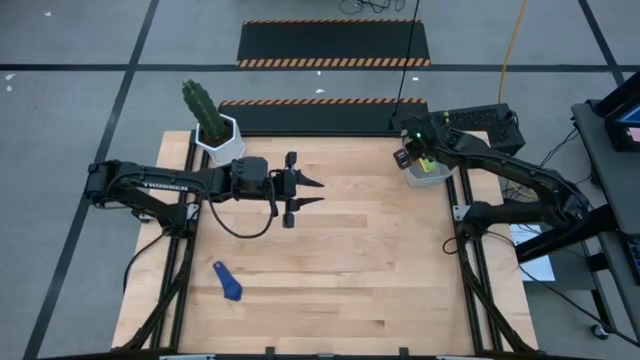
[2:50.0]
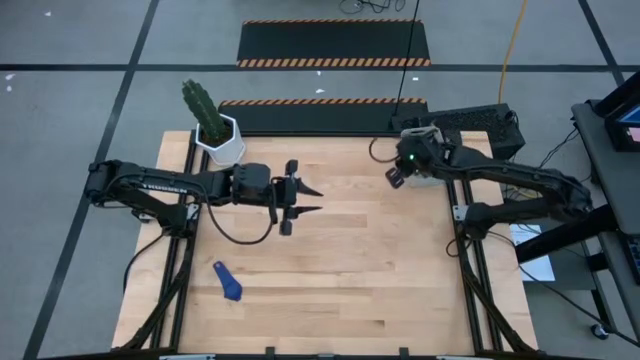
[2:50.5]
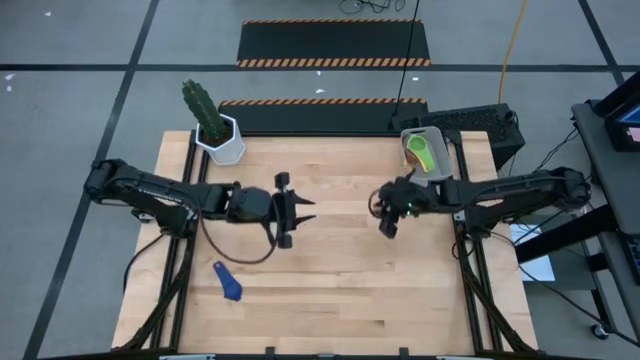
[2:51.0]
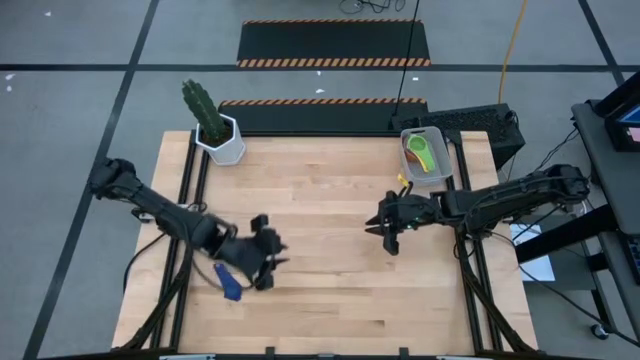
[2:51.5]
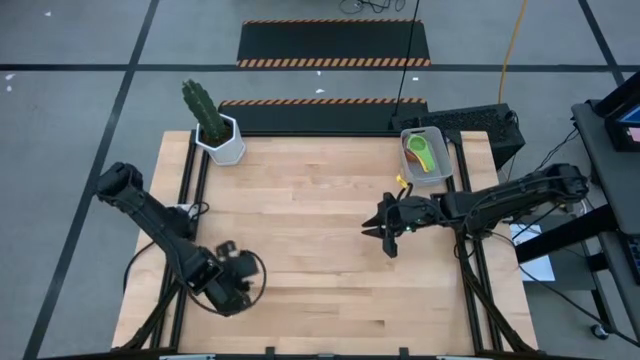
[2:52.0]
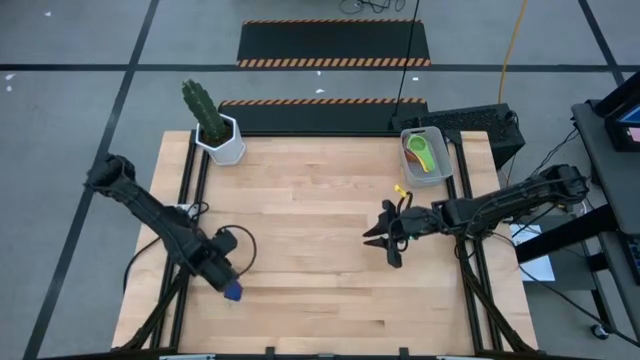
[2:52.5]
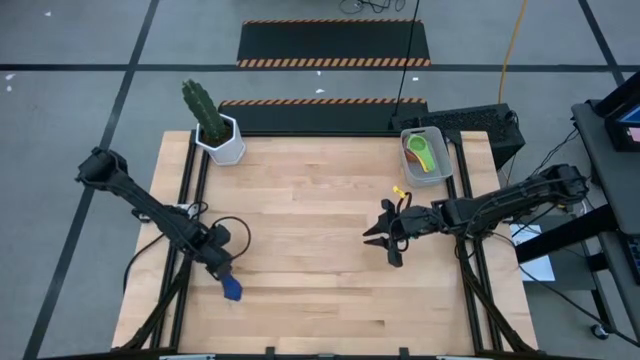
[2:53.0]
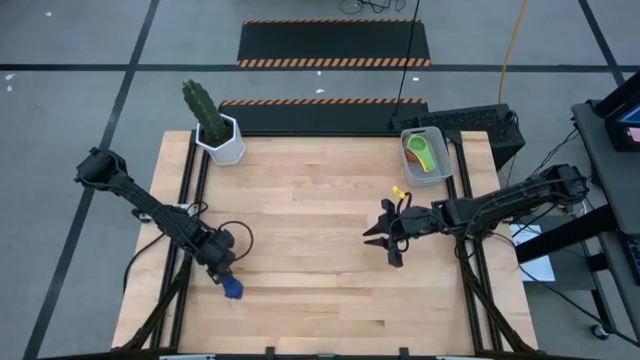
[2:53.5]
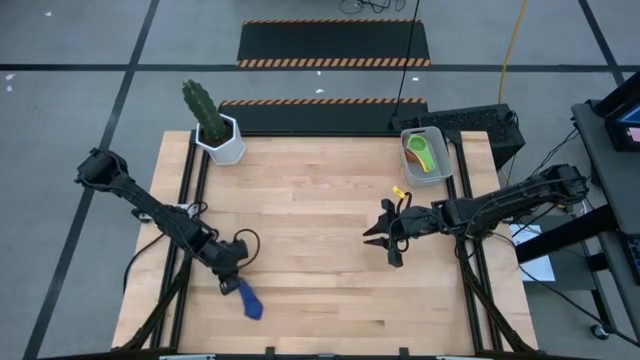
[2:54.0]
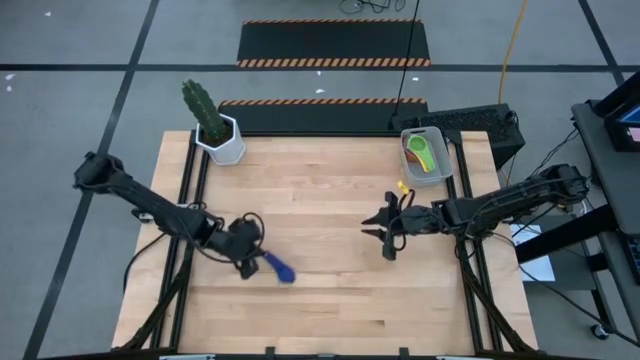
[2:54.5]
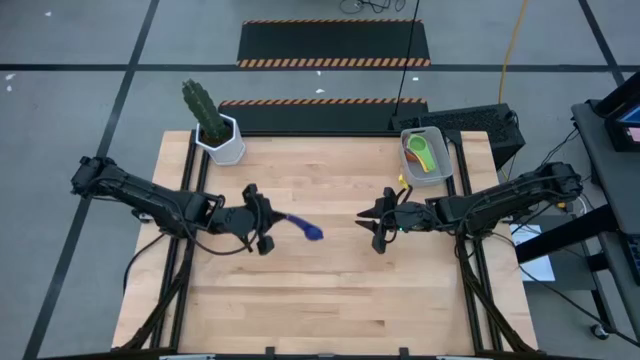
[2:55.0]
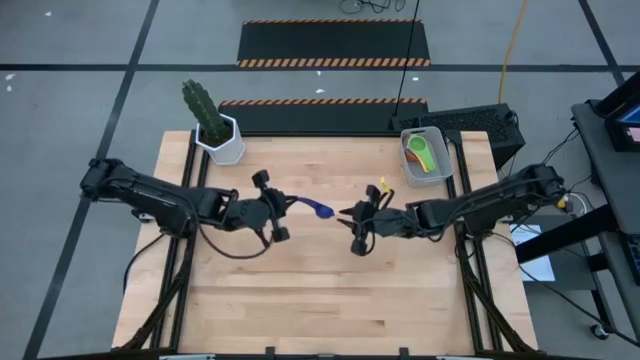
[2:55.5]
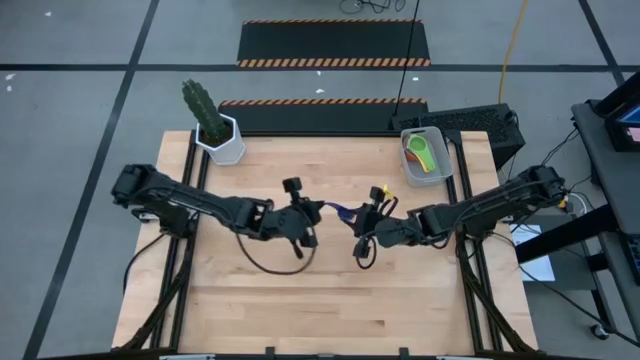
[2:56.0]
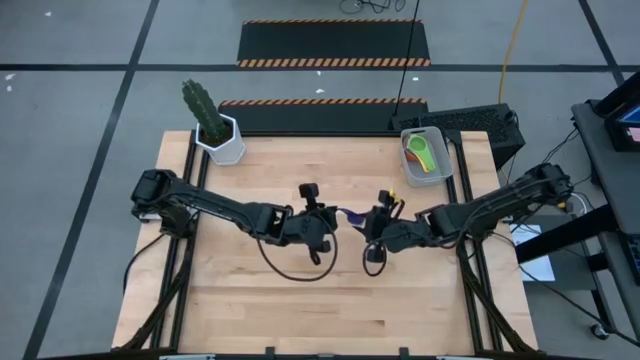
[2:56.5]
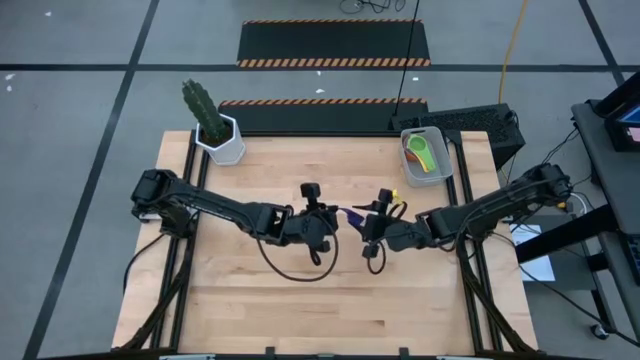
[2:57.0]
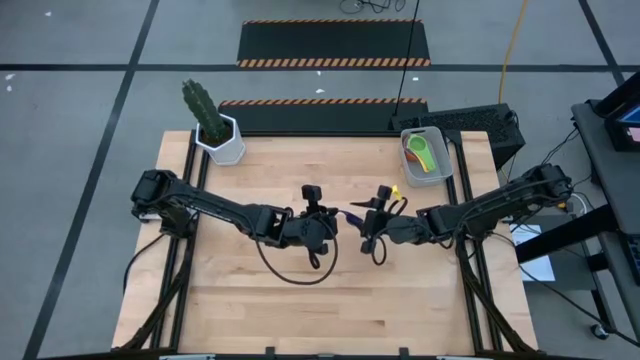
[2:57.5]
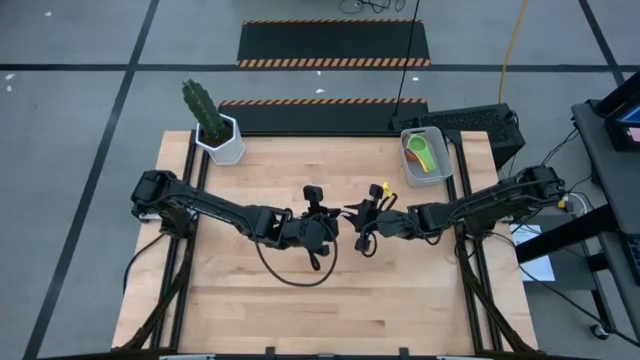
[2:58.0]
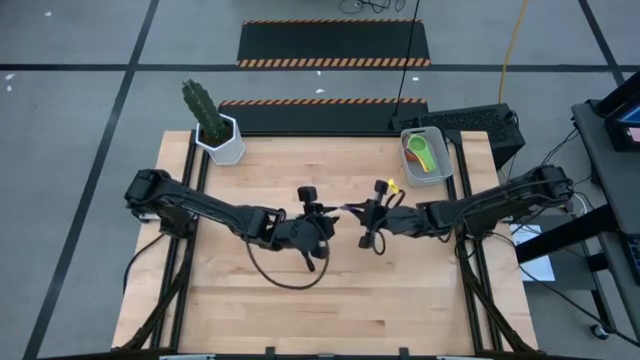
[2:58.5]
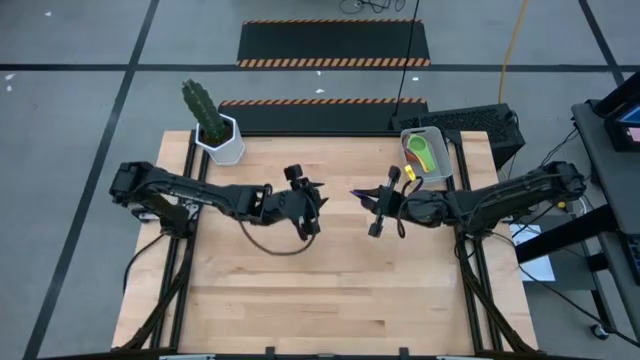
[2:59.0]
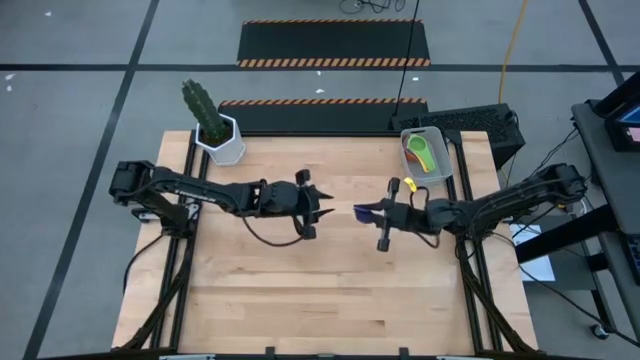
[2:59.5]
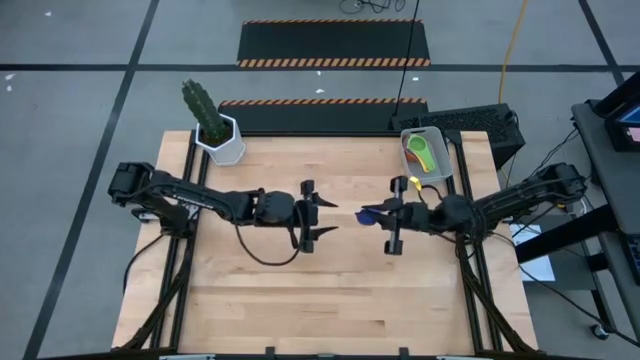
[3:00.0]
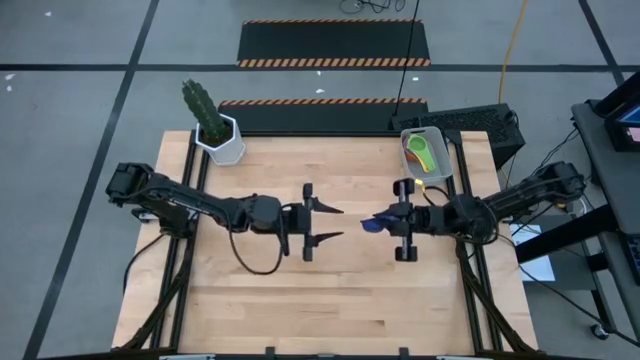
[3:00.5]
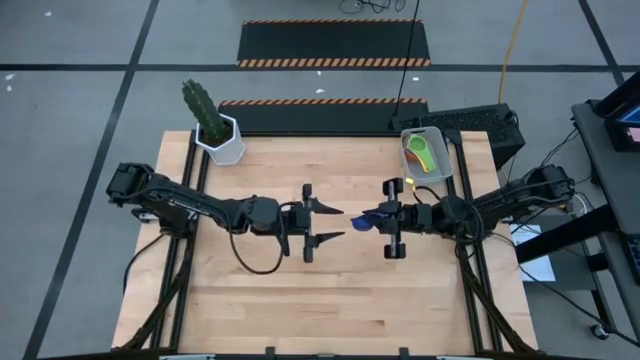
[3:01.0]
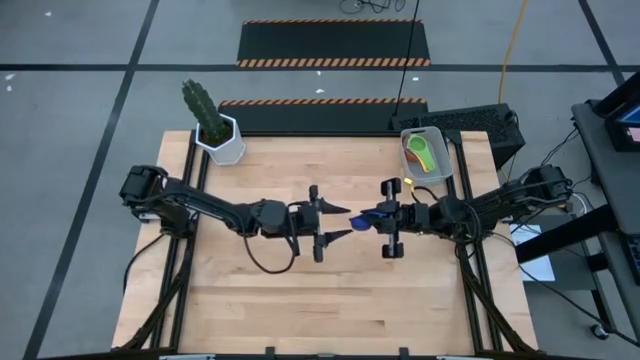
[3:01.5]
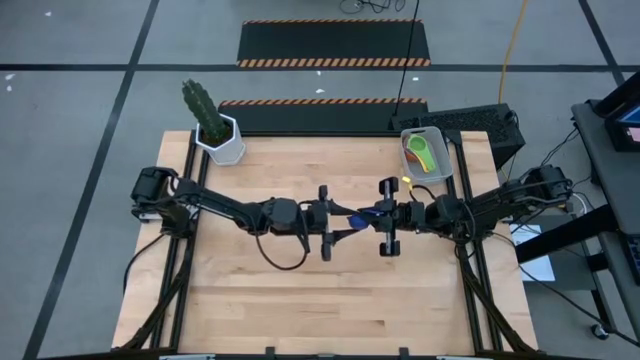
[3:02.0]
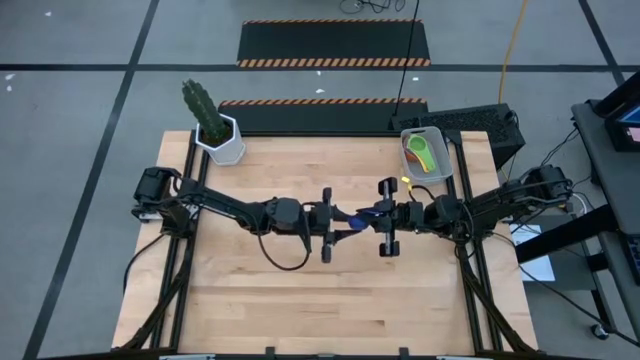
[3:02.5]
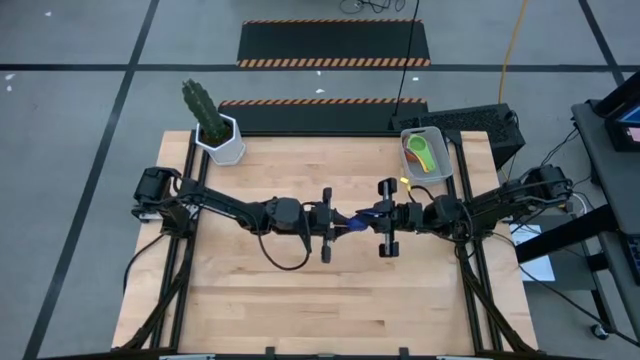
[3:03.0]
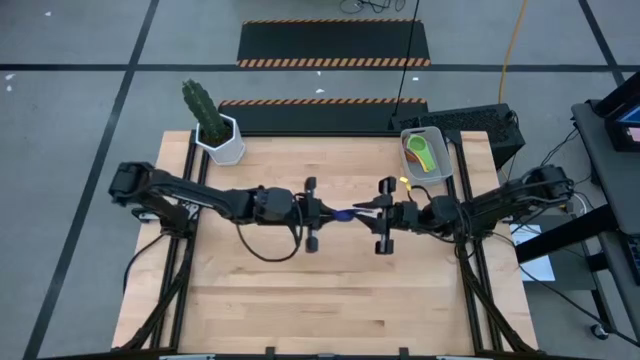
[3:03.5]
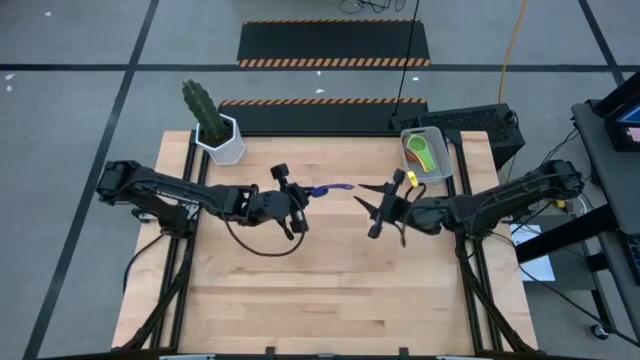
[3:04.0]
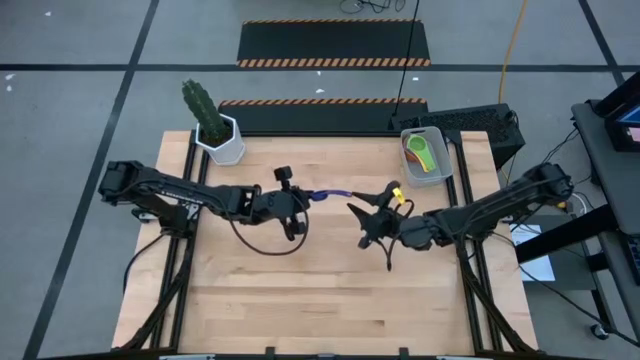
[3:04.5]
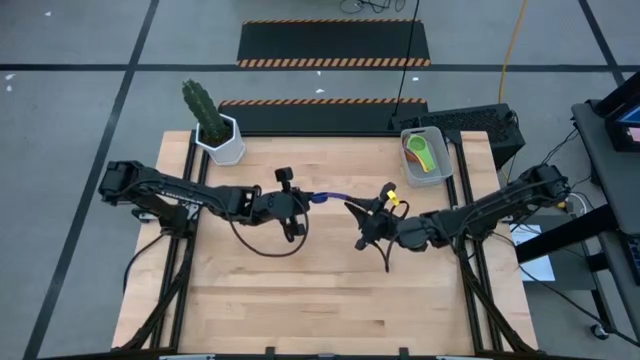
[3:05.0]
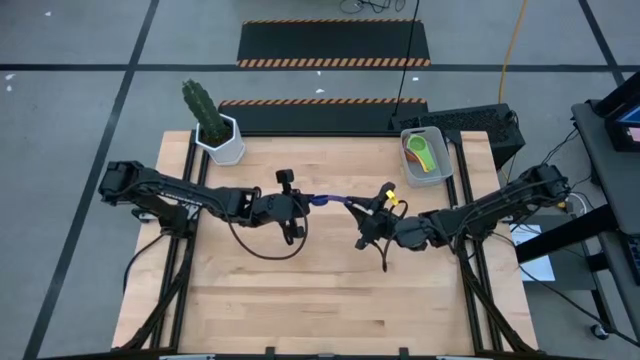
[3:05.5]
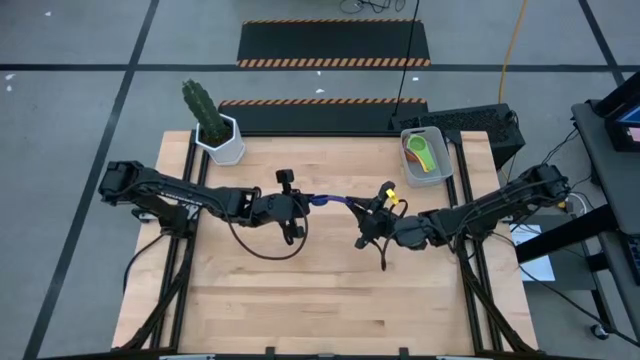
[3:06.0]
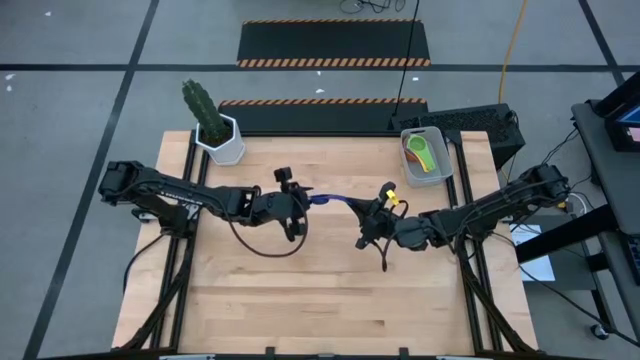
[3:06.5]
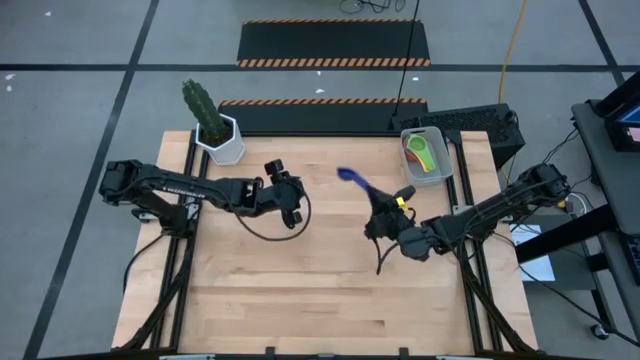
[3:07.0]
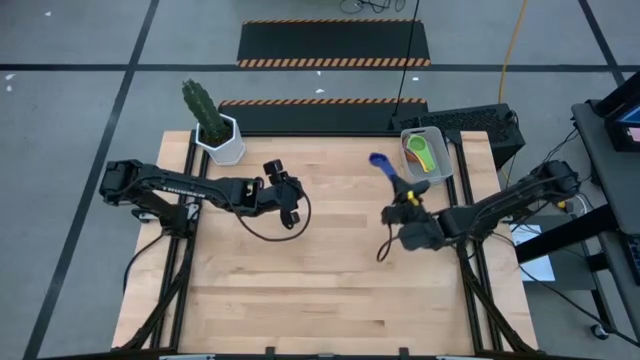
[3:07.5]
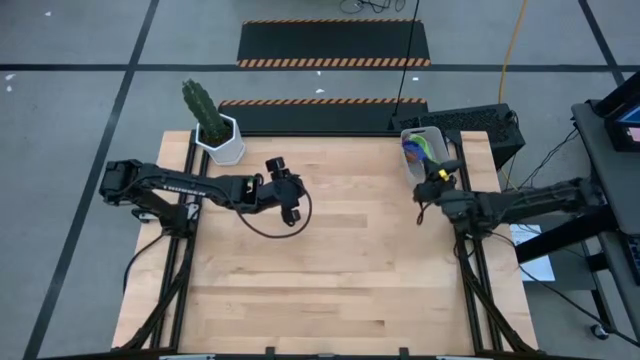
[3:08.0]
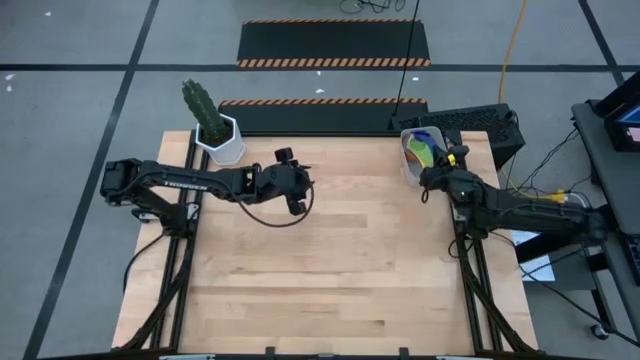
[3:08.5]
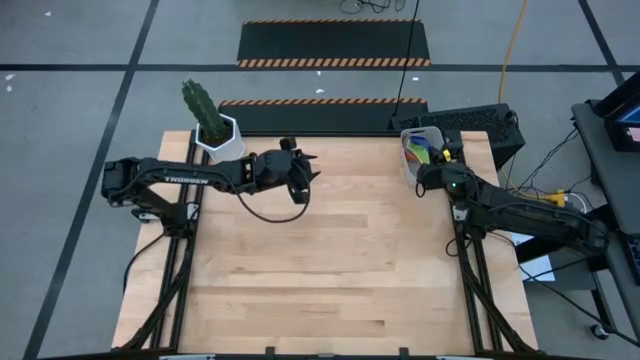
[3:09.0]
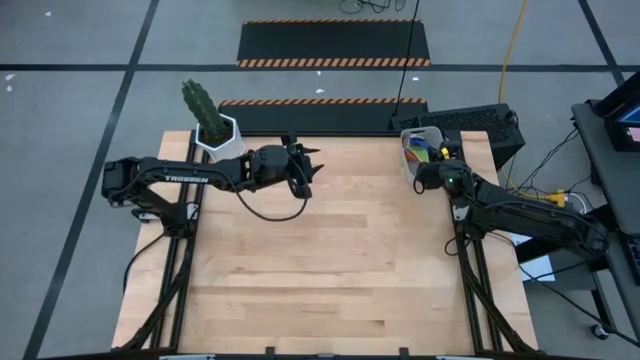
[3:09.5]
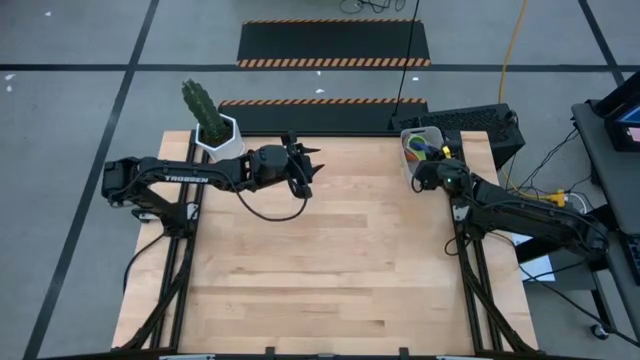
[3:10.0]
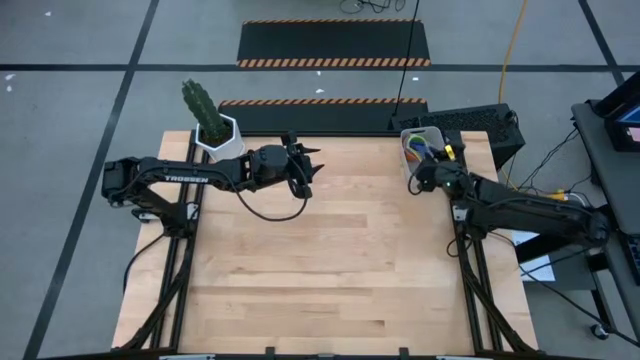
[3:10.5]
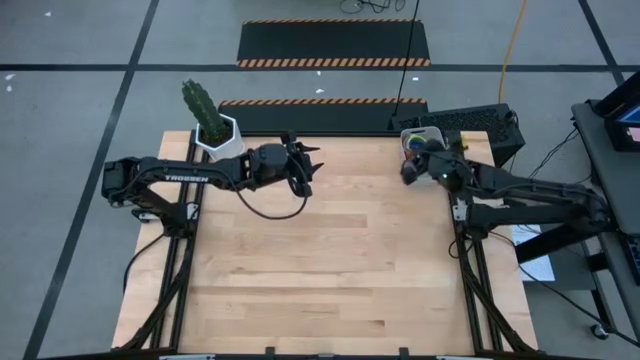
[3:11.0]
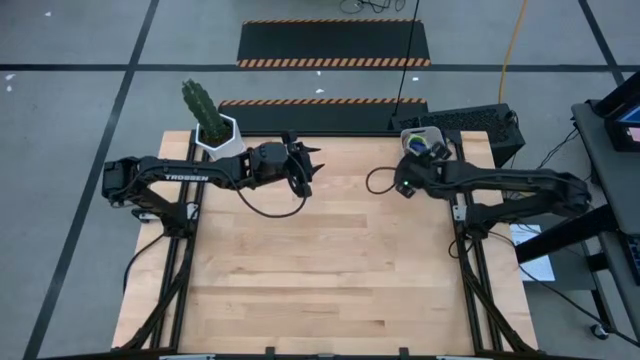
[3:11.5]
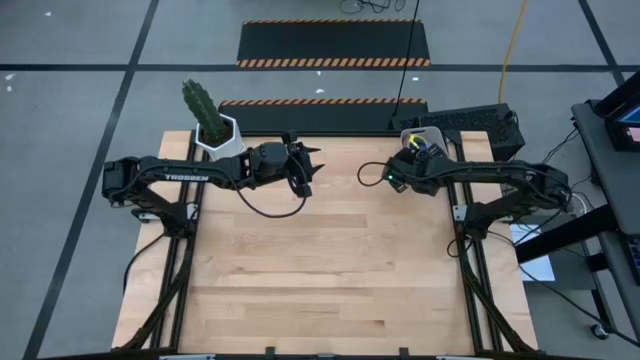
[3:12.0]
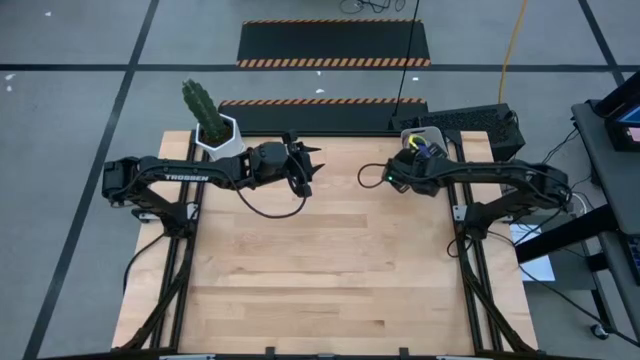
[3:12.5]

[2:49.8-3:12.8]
Task: Nest measuring cups in basket
Stack the purple measuring cup on top of the green measuring cup in the gray bin
